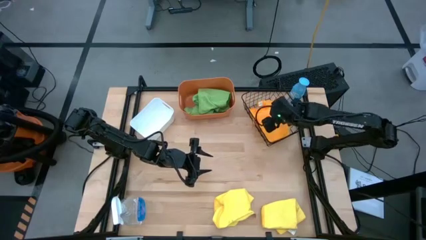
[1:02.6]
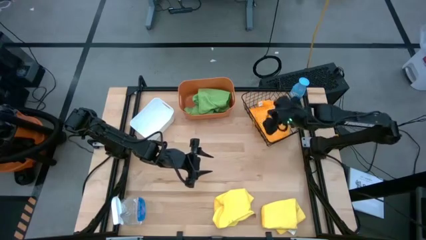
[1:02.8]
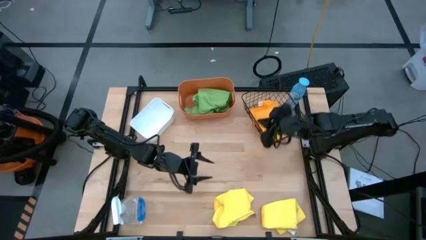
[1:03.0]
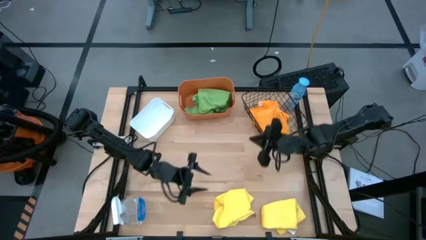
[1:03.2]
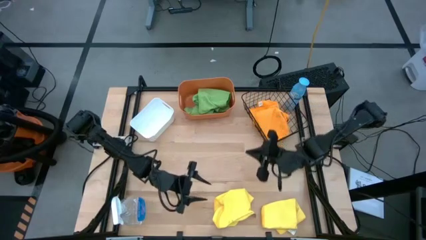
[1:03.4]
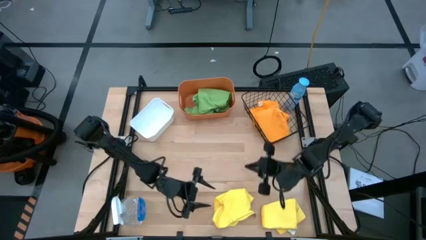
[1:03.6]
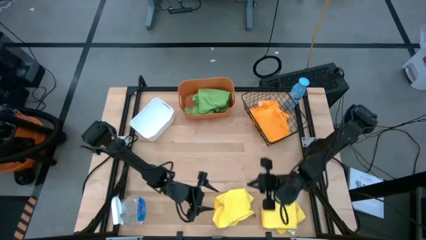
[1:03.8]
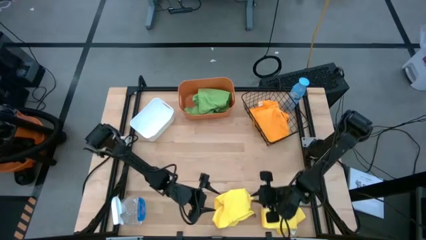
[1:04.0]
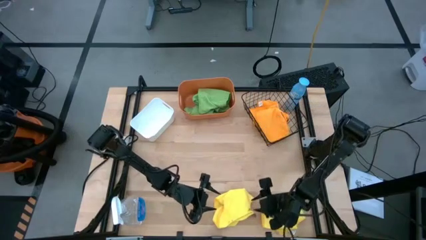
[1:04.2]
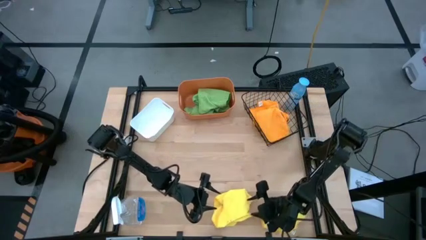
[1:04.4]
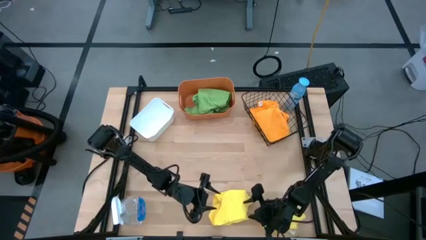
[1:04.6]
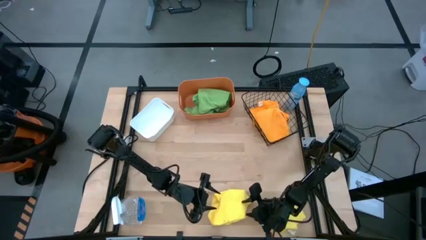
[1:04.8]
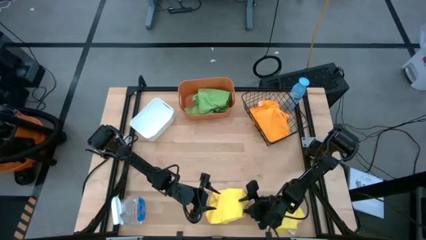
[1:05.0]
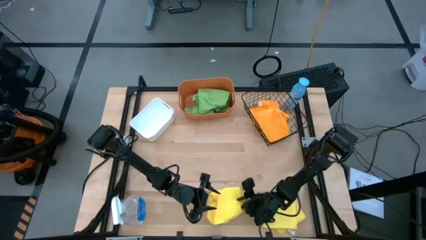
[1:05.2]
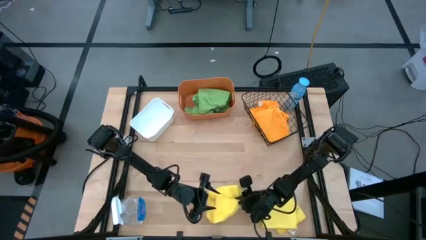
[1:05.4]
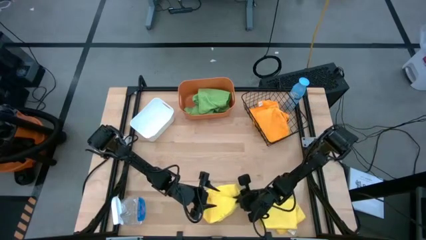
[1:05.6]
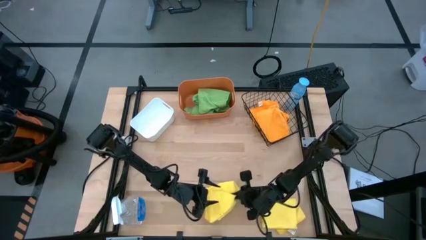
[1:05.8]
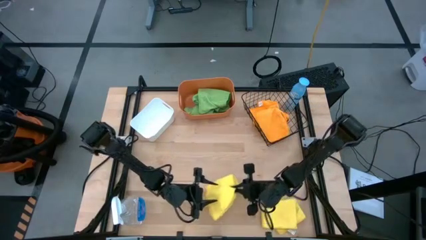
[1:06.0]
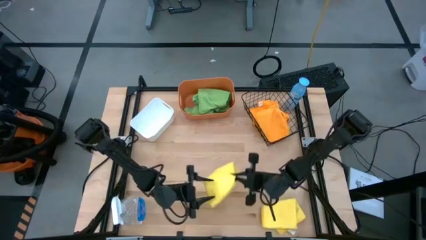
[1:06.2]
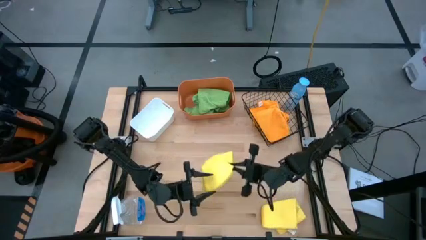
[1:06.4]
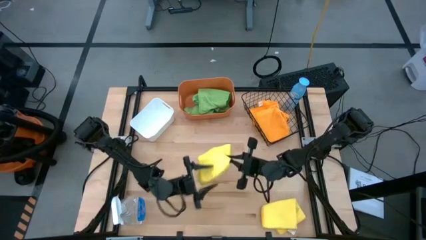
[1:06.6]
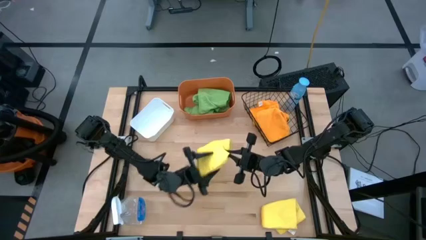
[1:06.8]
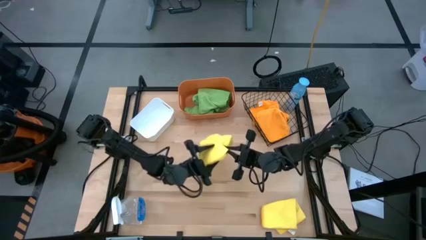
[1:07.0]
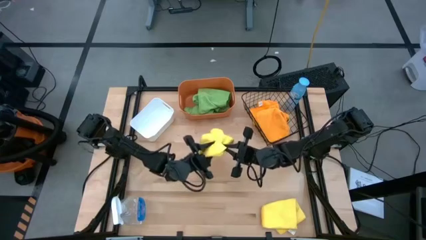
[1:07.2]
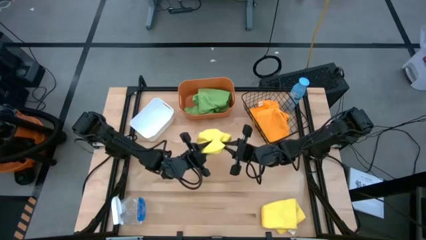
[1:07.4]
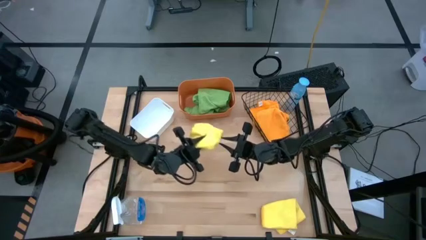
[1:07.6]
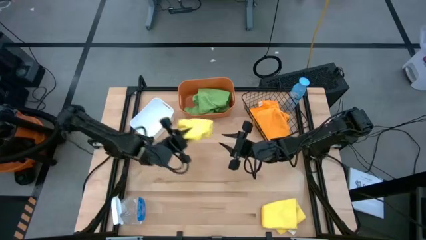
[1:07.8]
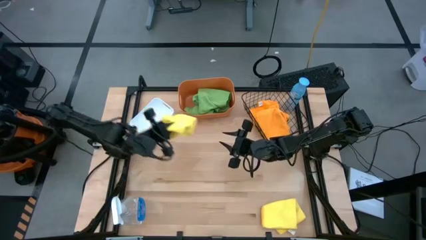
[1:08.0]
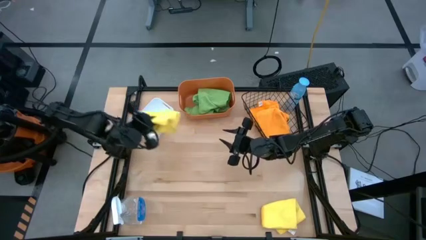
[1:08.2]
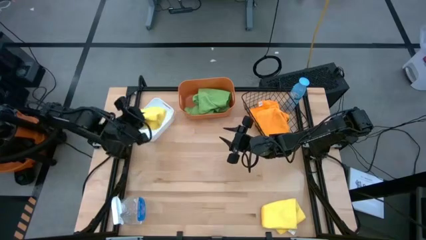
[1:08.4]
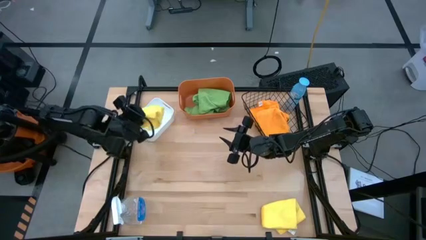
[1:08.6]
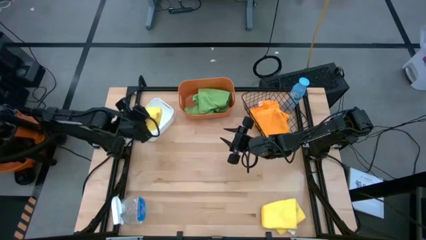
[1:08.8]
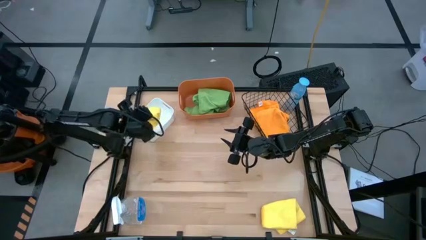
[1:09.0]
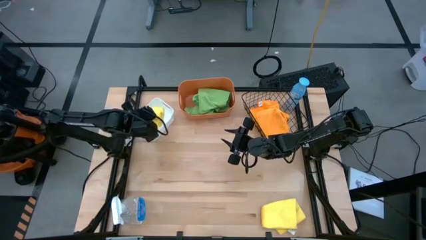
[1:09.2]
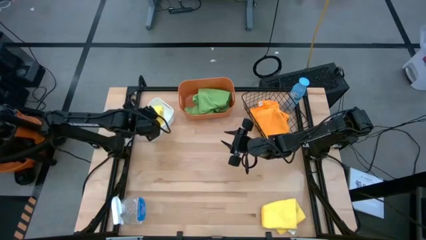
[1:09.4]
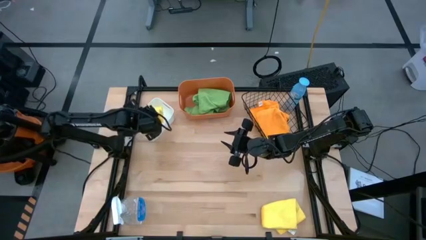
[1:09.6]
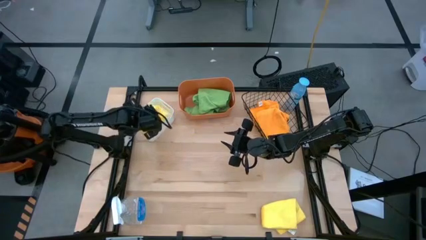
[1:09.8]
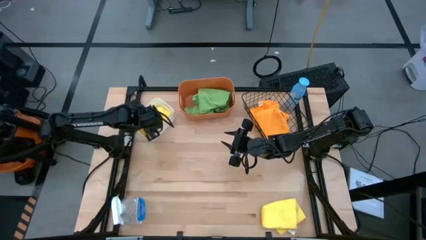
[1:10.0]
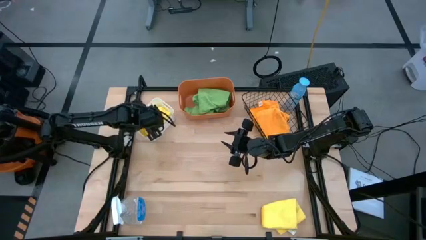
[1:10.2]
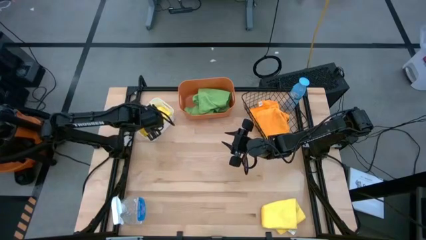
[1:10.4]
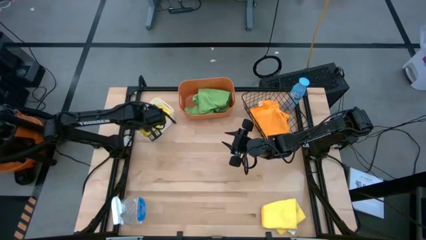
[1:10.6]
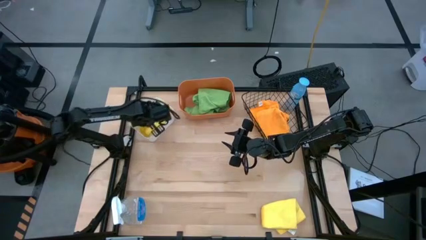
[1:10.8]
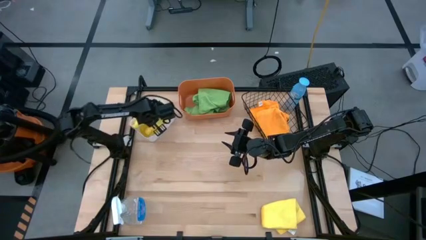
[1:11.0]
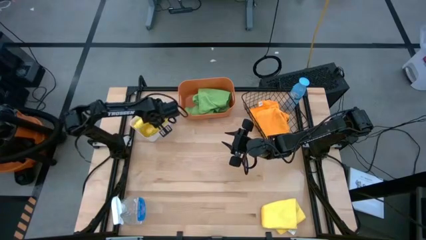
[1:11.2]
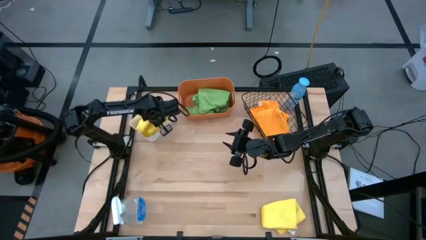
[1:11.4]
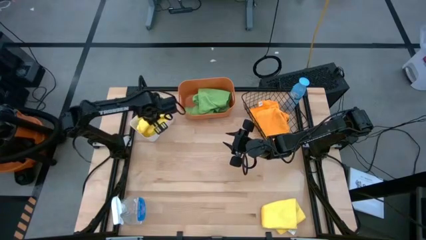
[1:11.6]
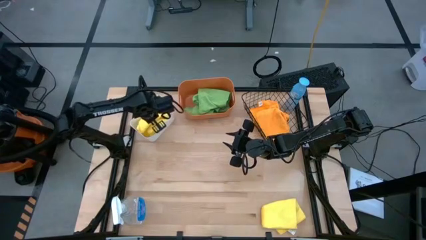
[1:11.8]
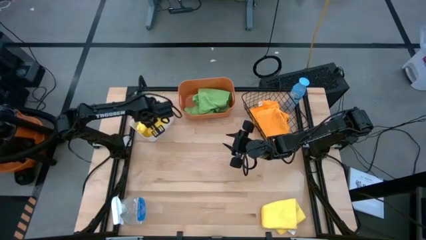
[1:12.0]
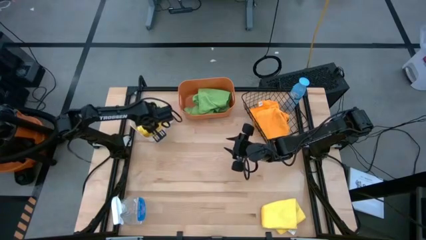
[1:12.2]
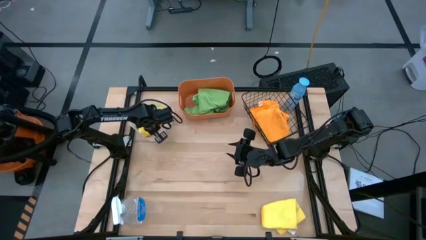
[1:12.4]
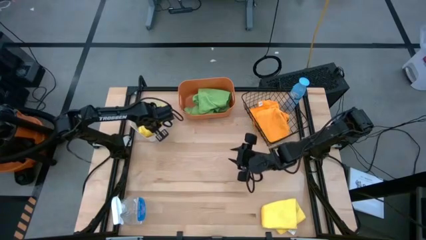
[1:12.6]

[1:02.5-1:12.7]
Task: Sort microfiber towel by color & place in baskets
Put the left yellow towel into the white bin

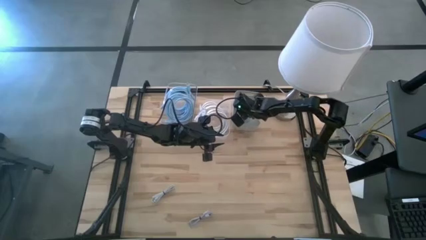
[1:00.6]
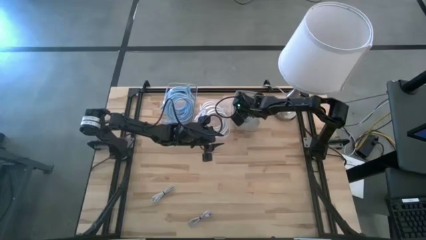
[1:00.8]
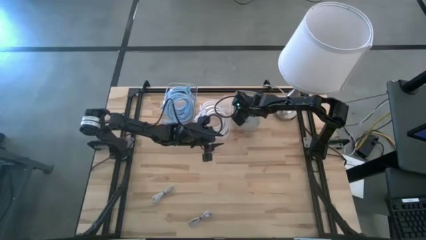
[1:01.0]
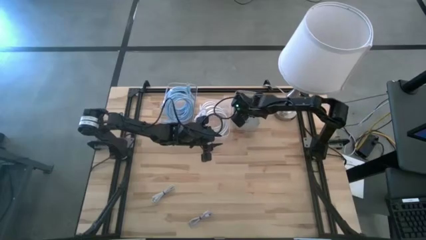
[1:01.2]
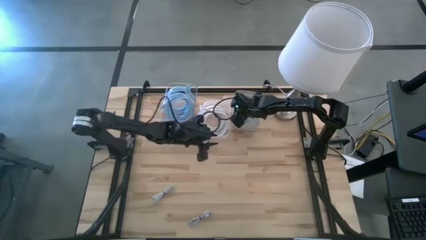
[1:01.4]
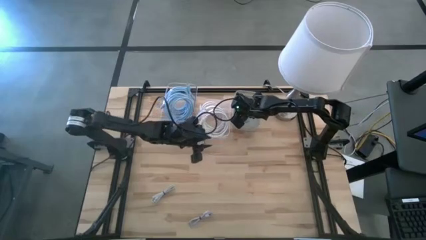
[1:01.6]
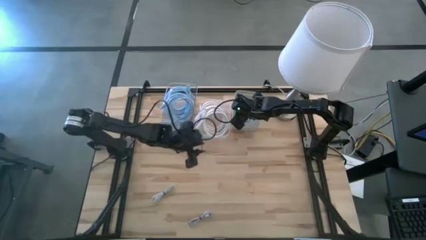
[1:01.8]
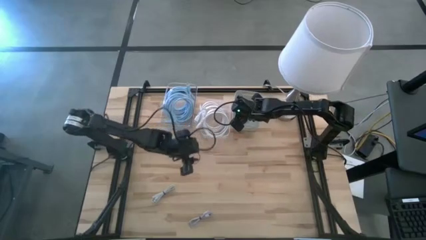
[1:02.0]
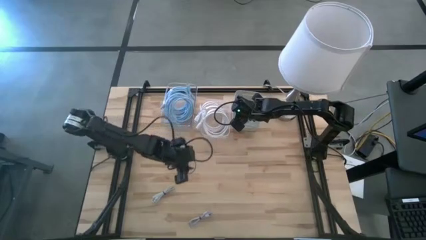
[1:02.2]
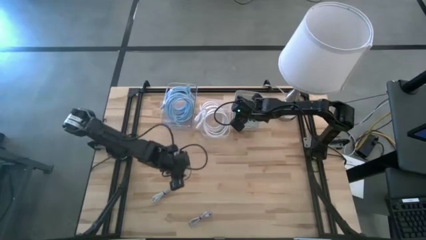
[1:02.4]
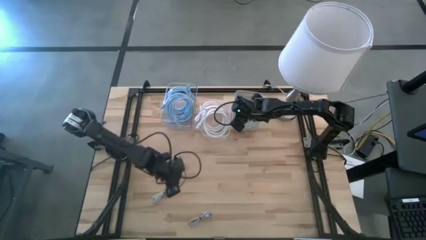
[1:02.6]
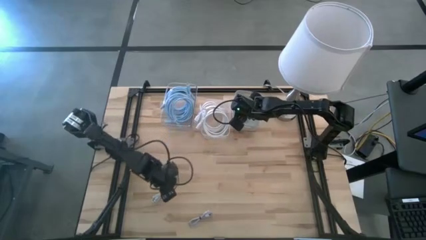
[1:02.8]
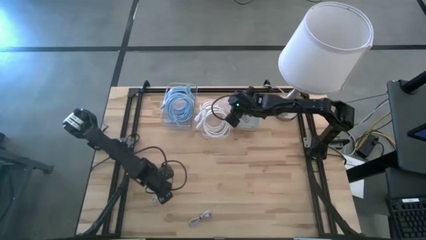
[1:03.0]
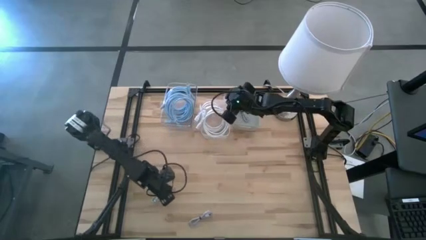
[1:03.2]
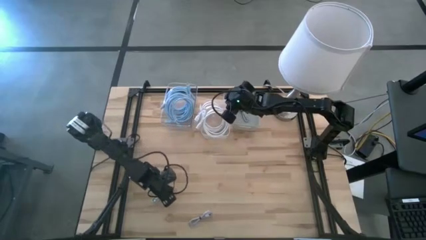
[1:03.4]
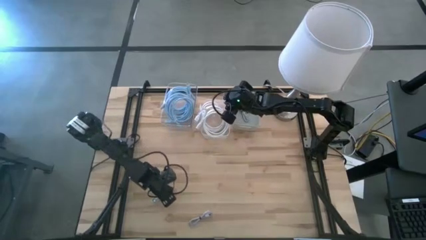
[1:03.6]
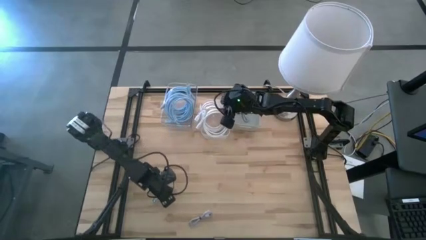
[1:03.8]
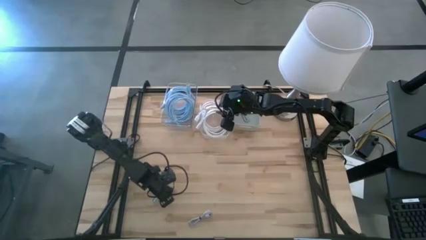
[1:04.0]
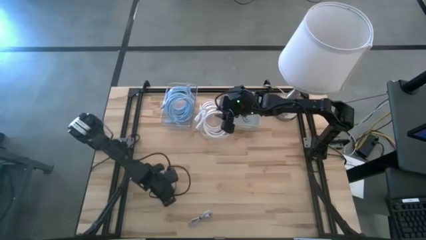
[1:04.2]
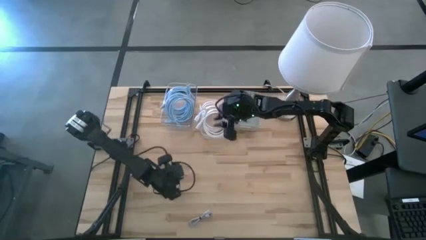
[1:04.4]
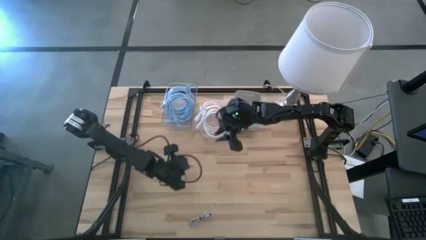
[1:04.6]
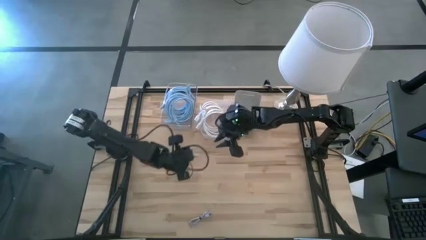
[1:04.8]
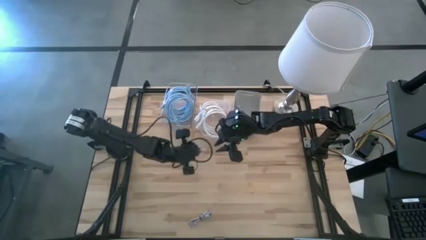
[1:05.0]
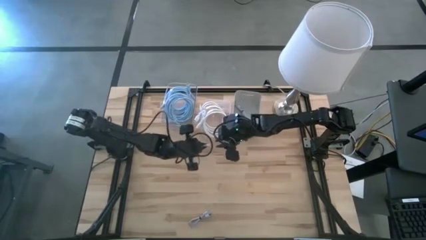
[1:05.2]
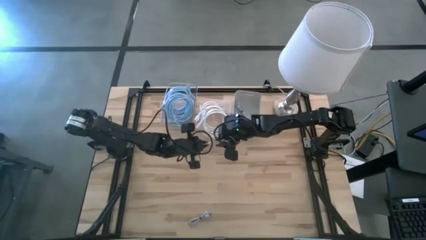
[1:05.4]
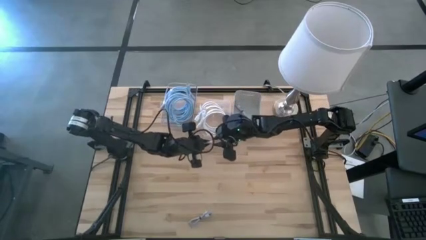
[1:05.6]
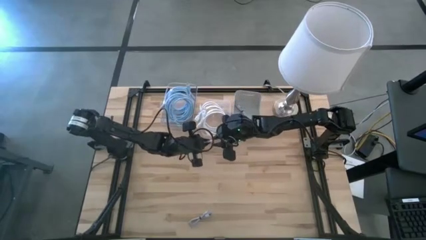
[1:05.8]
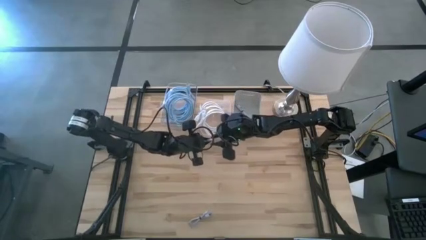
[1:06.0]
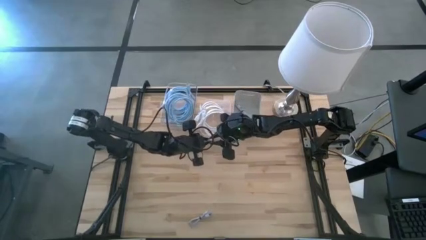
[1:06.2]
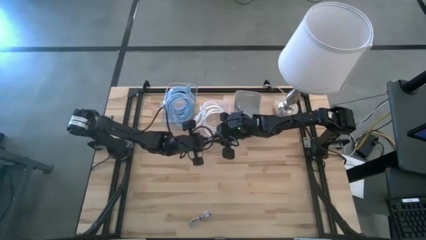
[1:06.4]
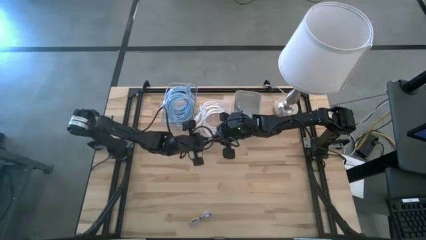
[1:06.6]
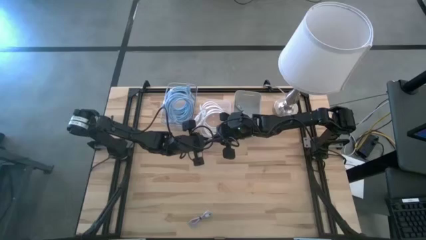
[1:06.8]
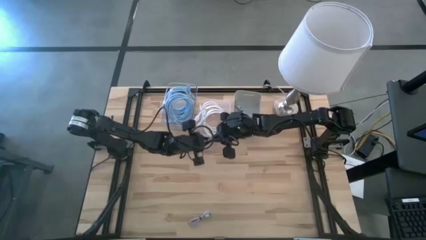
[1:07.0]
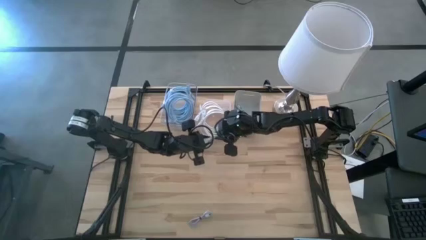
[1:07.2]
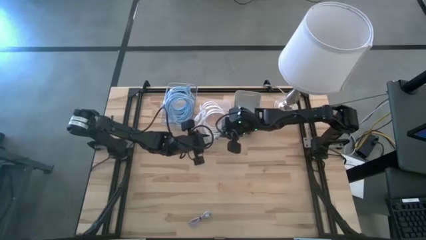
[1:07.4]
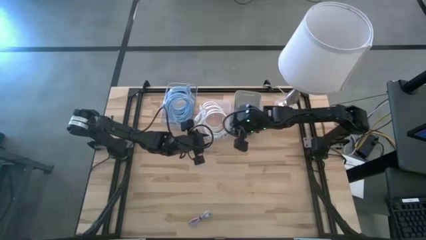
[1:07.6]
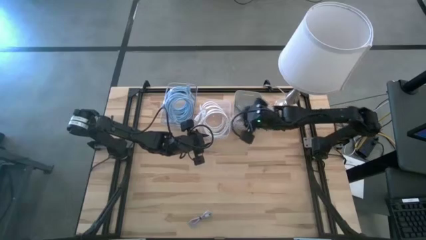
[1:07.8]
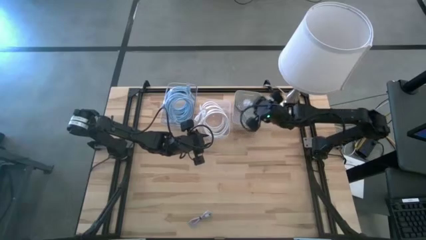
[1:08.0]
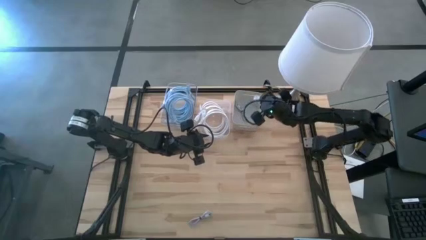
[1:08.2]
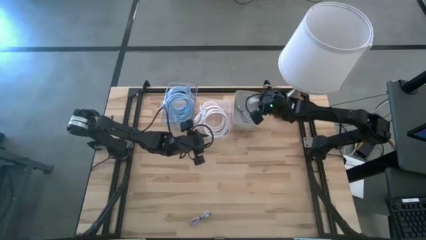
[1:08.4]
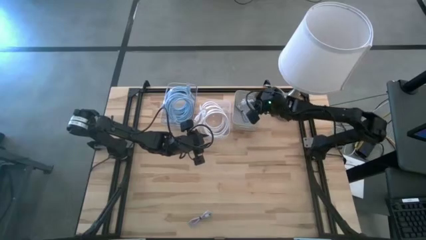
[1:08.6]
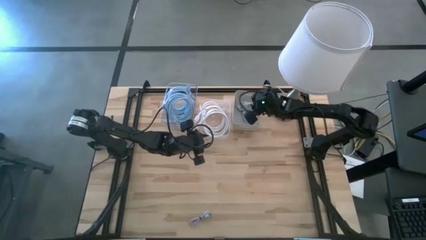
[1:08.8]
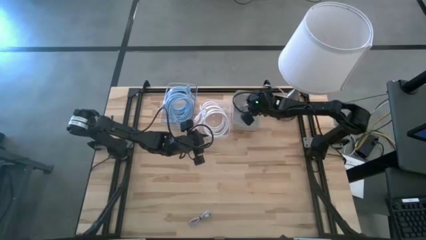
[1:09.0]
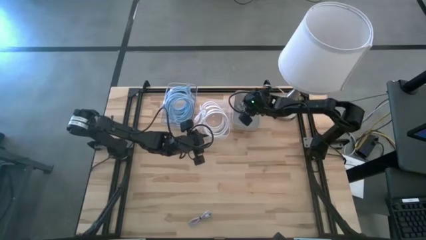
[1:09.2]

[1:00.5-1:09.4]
Task: Pick & Place USB Port
Put the white charger cable into the white bin
